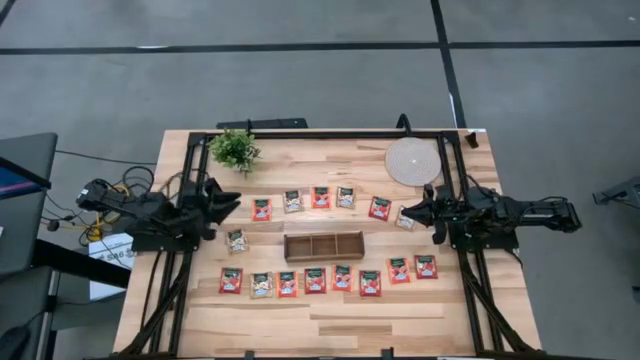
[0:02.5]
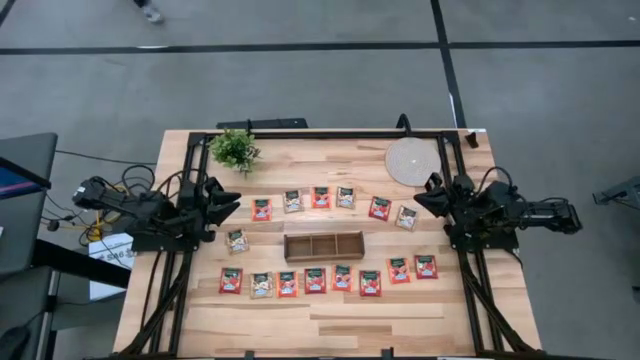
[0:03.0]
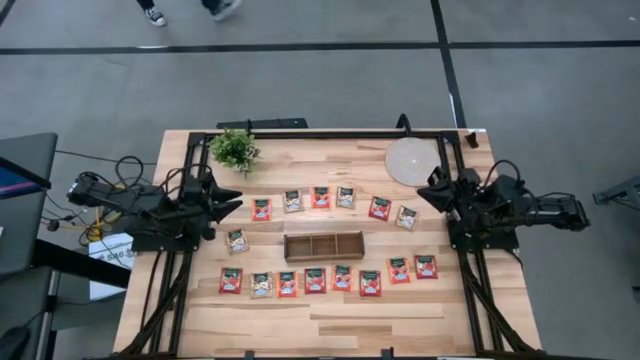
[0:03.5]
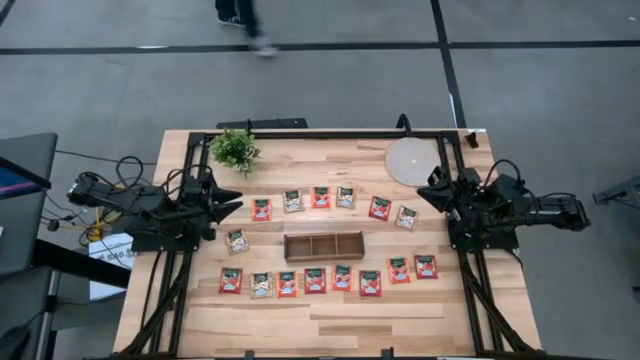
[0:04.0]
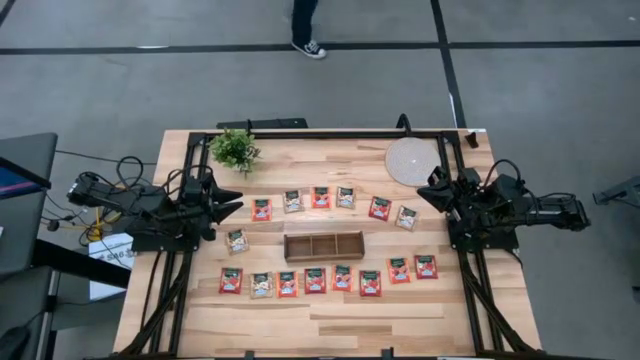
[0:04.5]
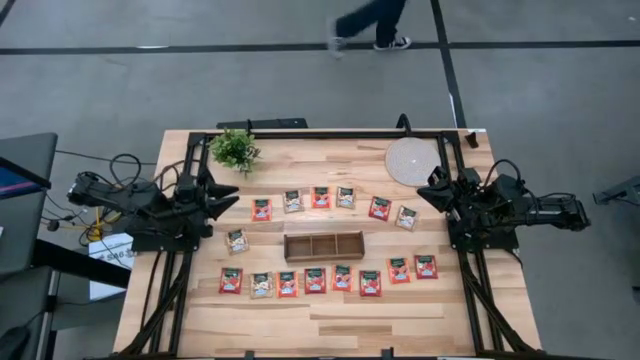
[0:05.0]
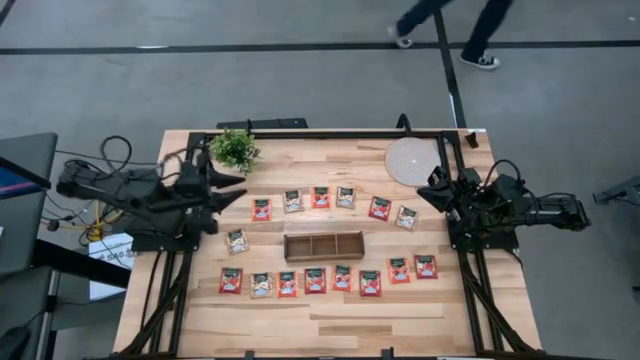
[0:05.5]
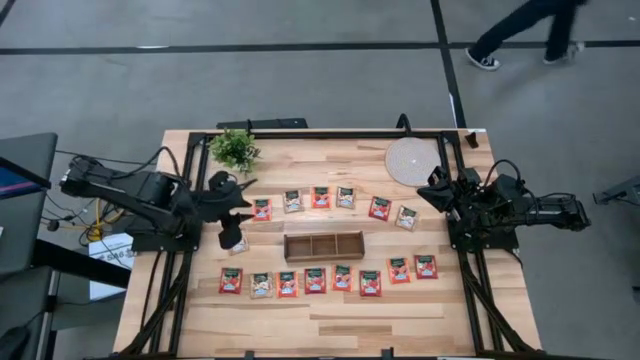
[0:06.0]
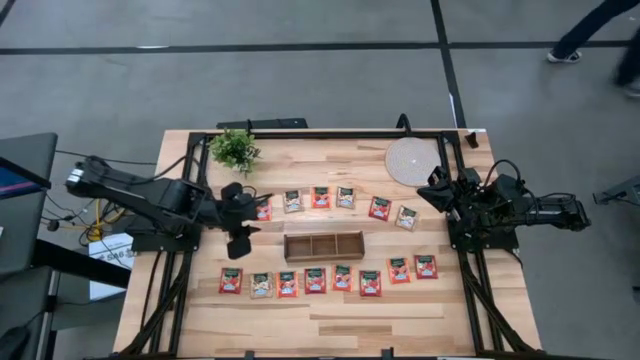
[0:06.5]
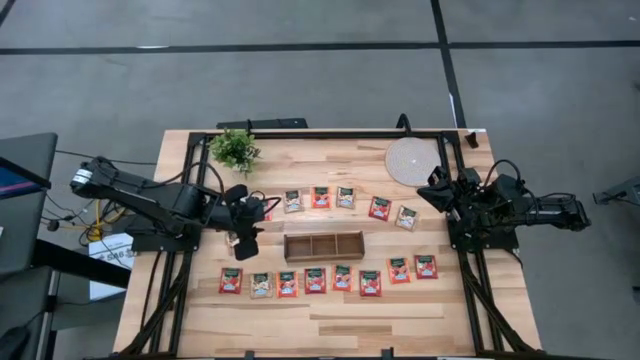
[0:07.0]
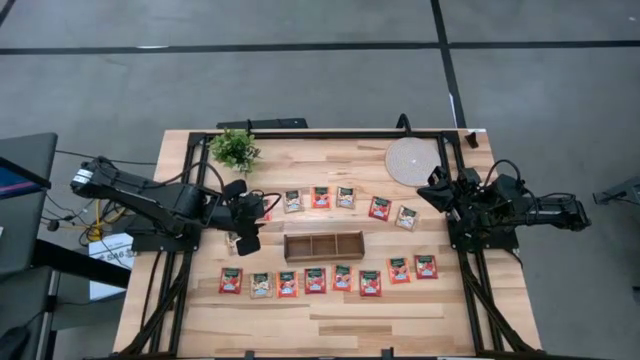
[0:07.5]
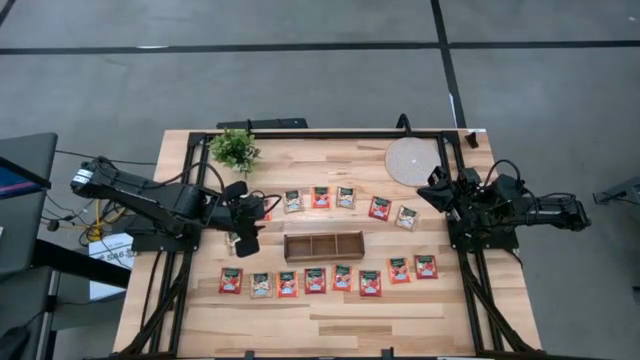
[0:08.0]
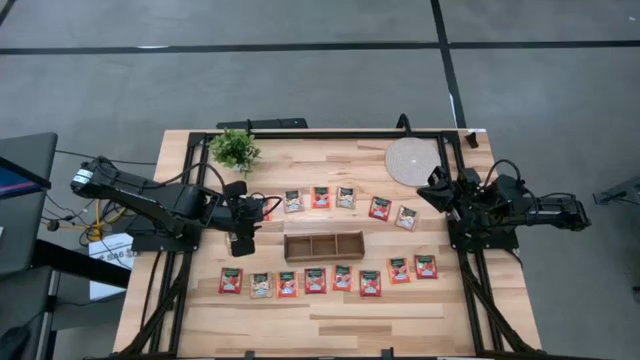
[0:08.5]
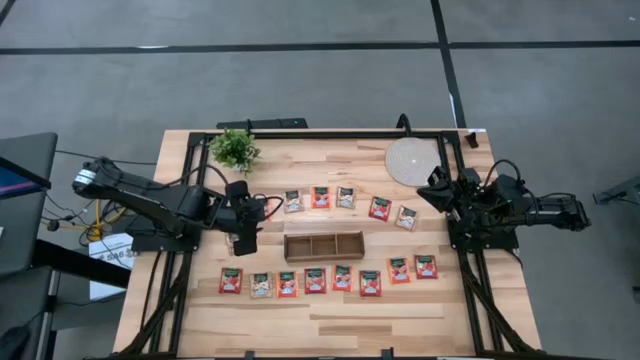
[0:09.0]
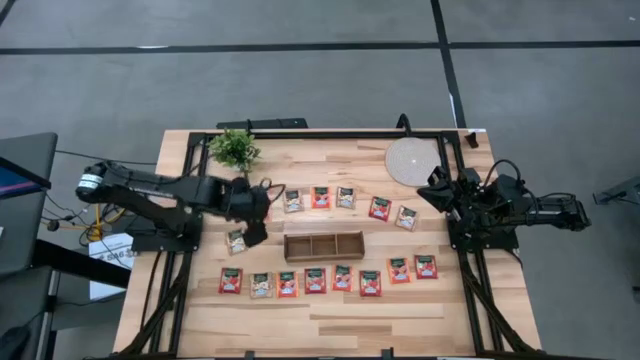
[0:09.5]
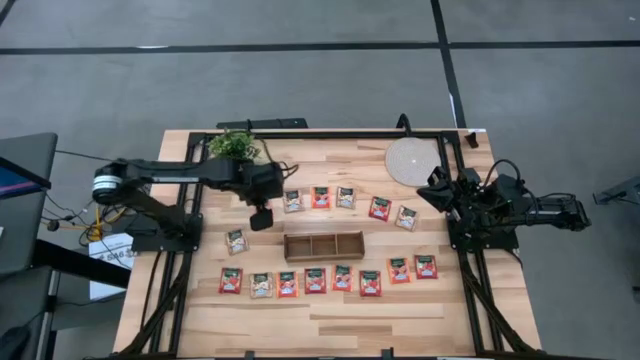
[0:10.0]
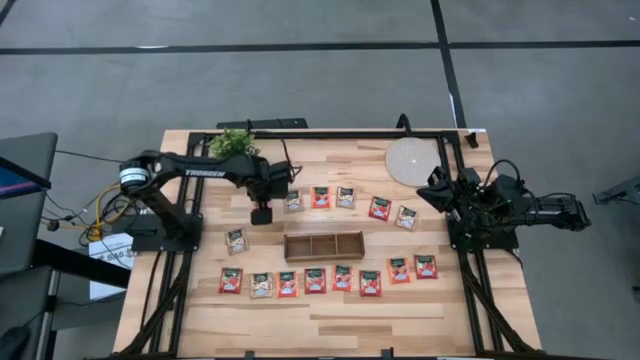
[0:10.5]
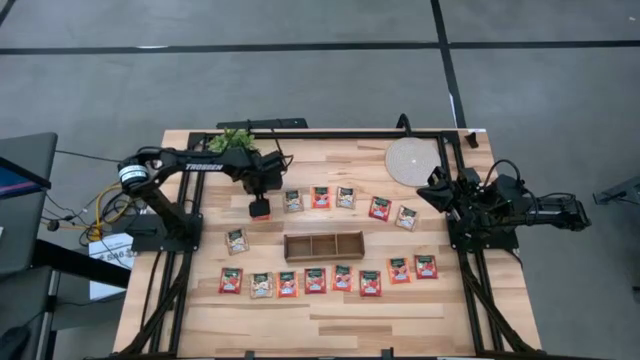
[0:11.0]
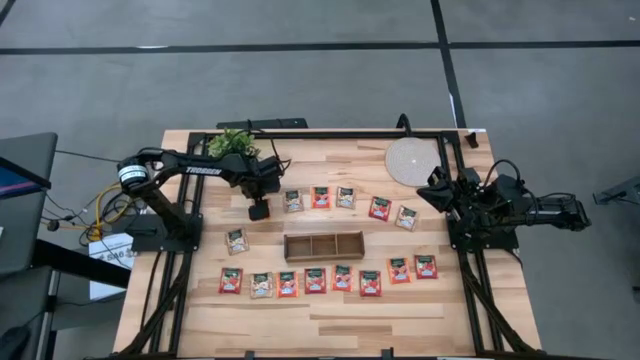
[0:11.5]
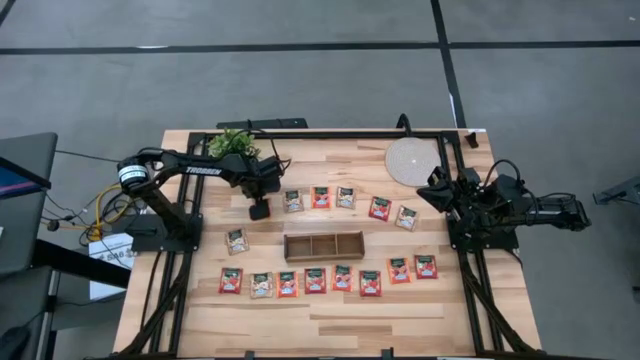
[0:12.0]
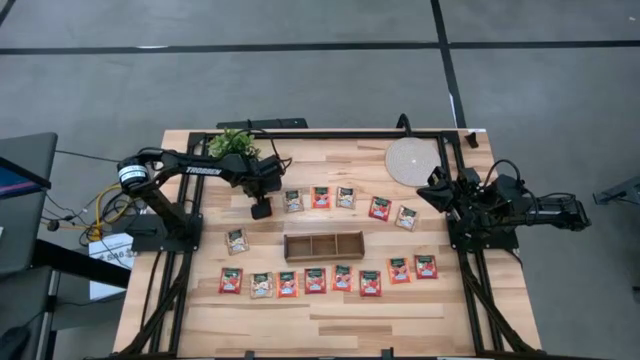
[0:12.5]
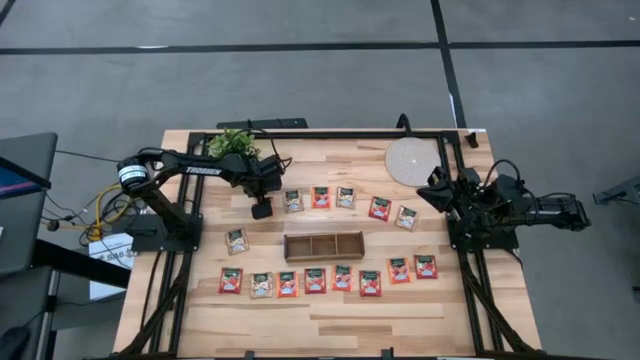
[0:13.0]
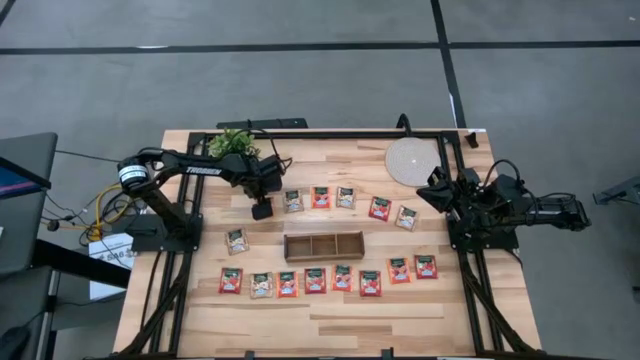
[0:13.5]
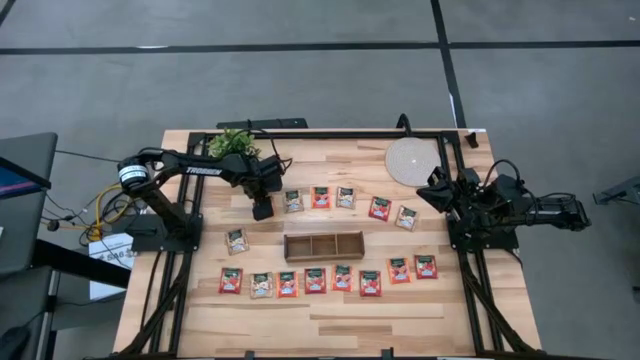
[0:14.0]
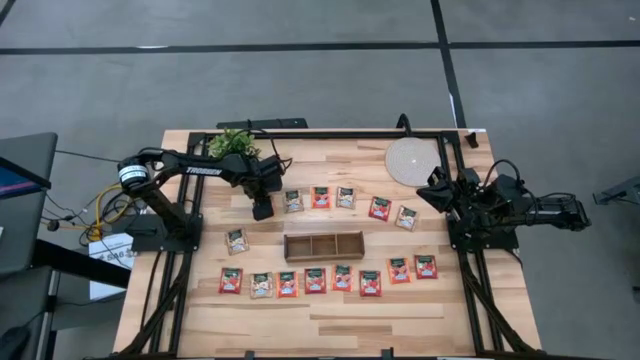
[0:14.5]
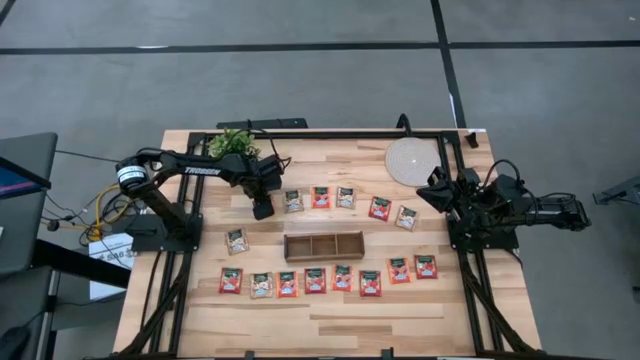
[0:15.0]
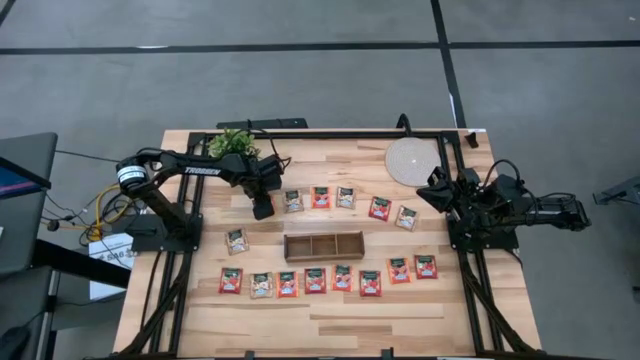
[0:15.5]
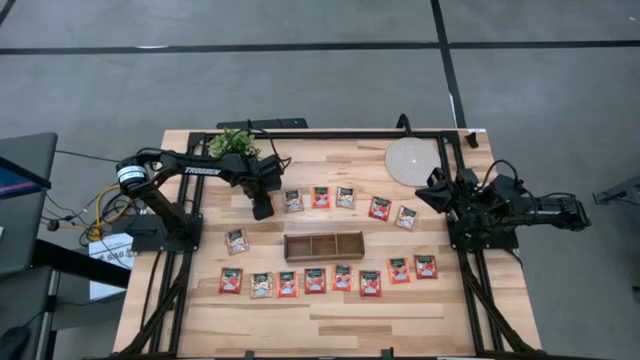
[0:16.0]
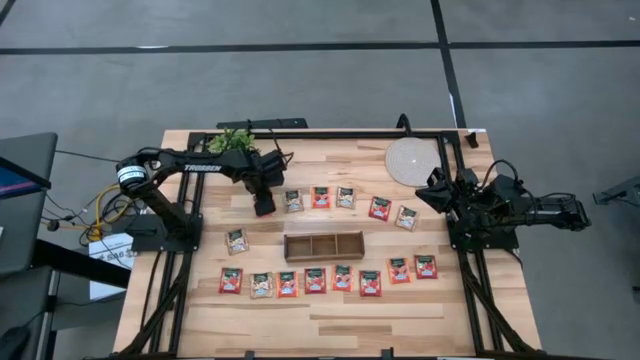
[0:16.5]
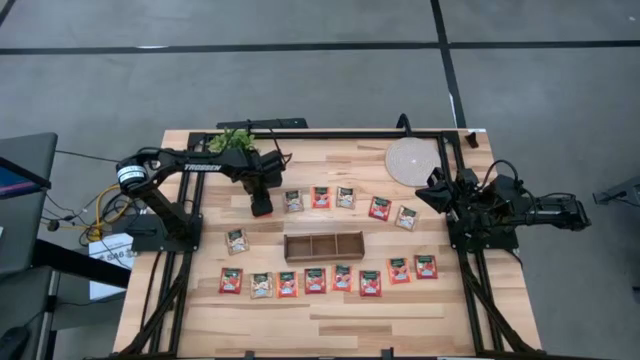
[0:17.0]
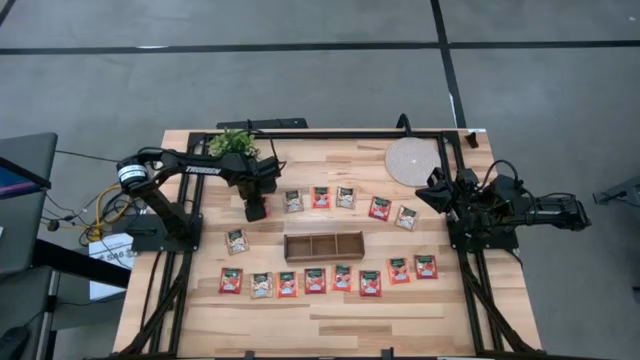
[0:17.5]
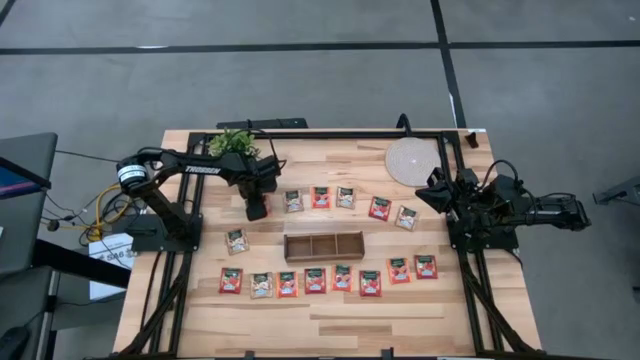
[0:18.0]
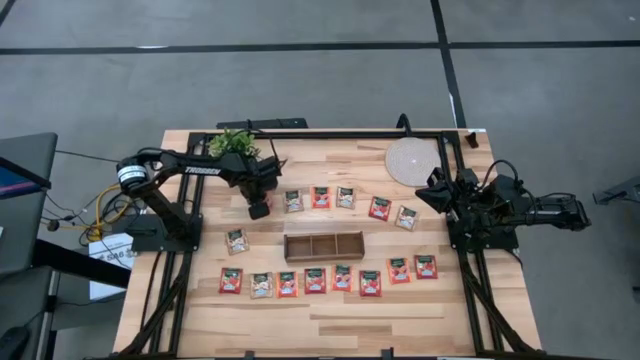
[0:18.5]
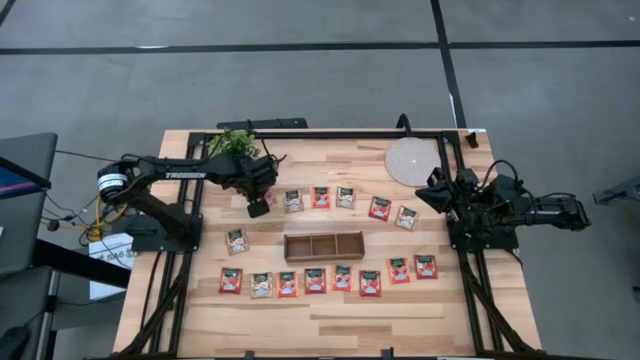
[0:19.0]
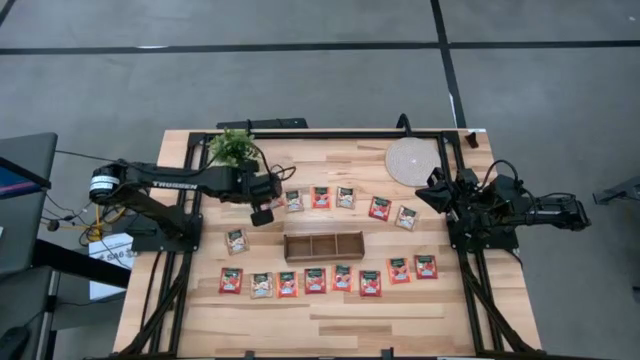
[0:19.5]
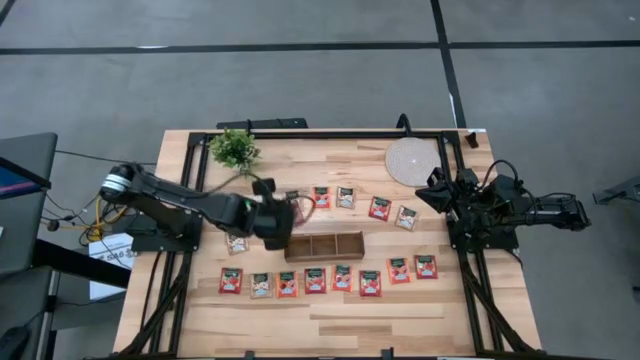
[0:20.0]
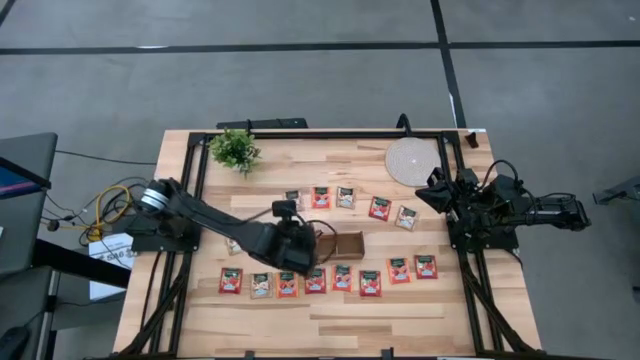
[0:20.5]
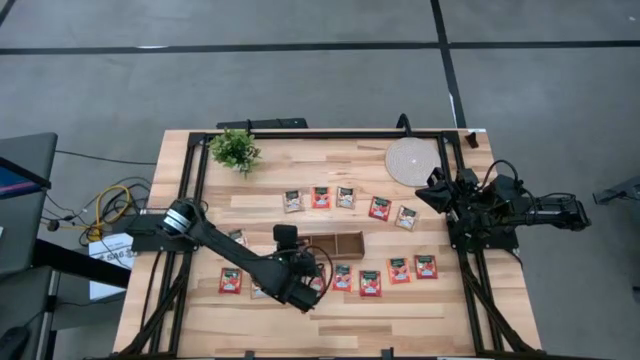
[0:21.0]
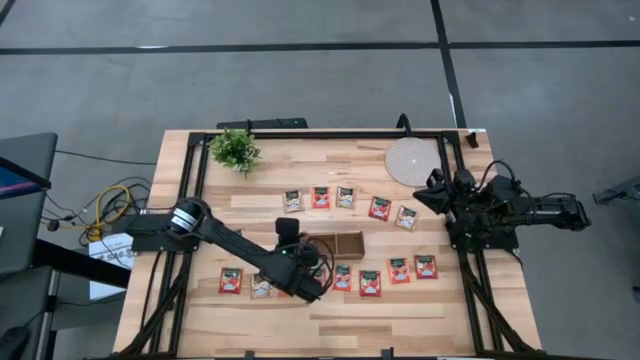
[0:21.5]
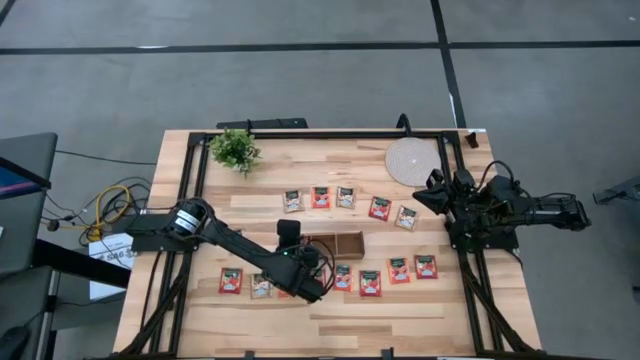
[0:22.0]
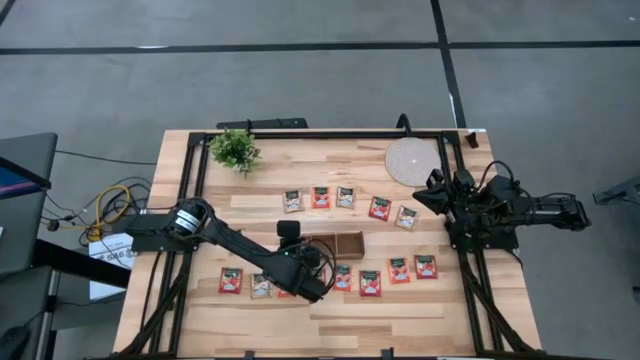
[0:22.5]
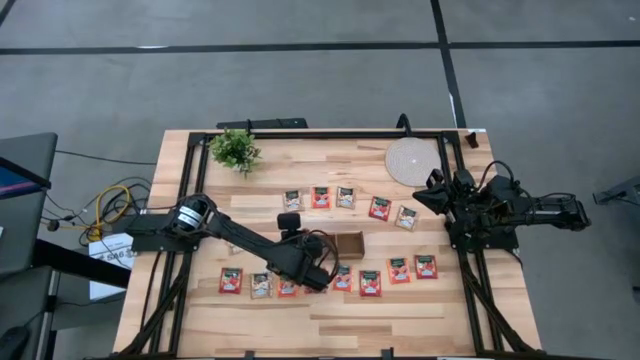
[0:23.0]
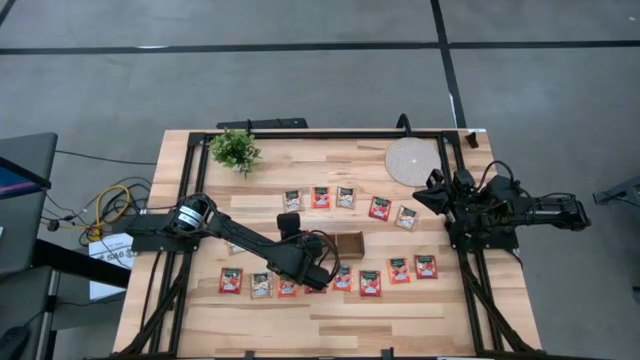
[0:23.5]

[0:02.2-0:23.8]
Task: Pick & Place Tea
Put the orange tea bag into the left section of the wooden organizer
